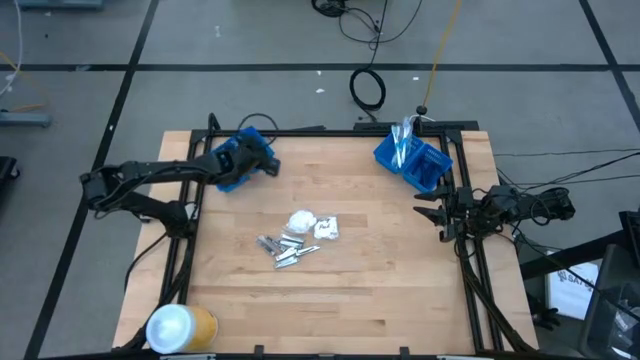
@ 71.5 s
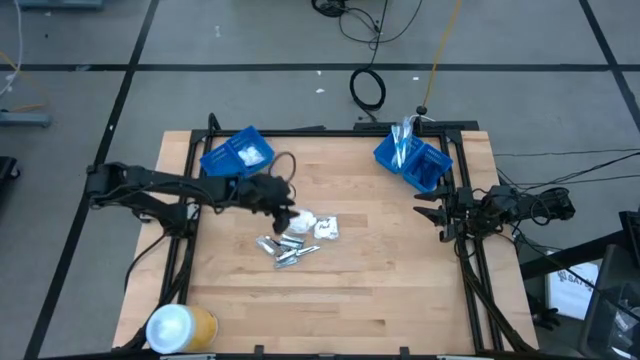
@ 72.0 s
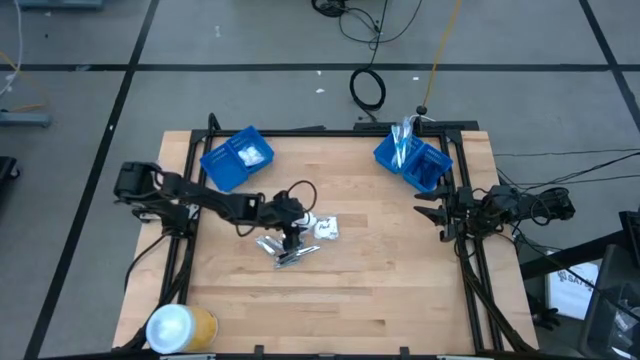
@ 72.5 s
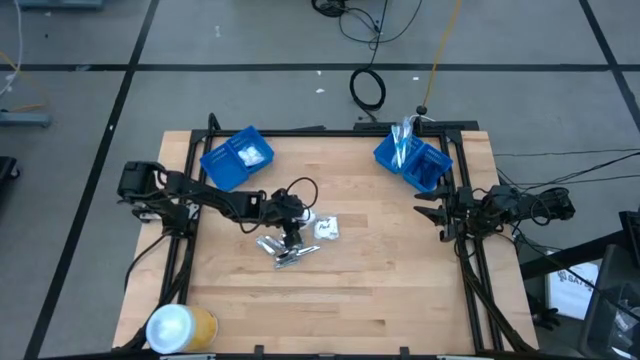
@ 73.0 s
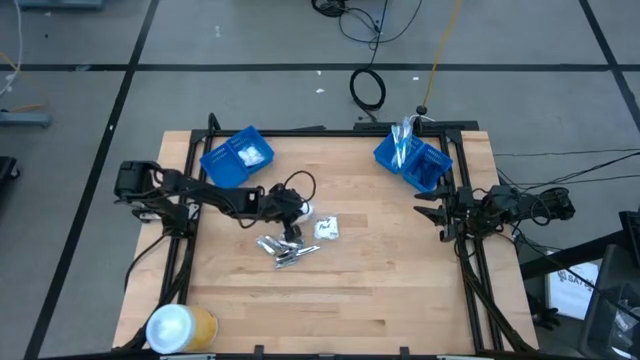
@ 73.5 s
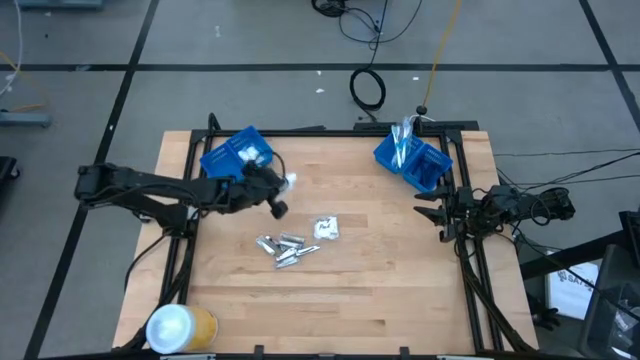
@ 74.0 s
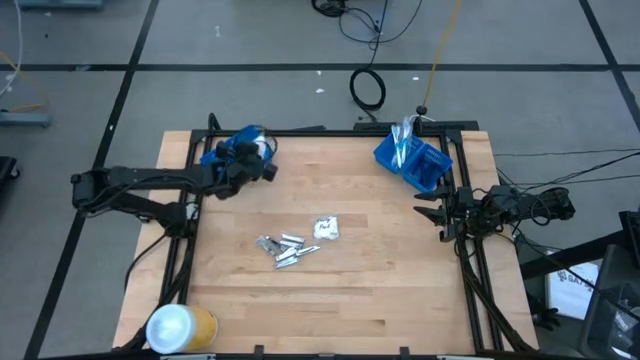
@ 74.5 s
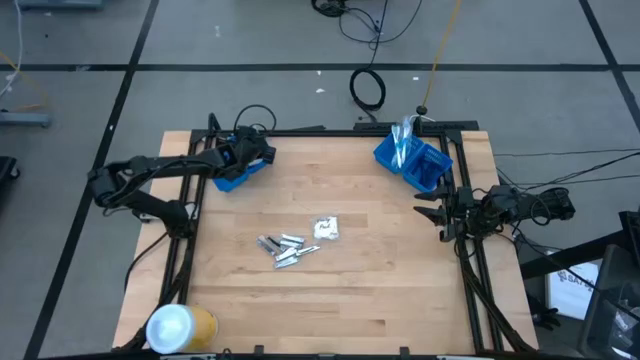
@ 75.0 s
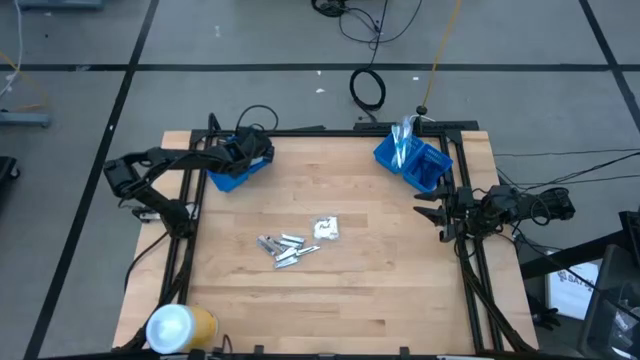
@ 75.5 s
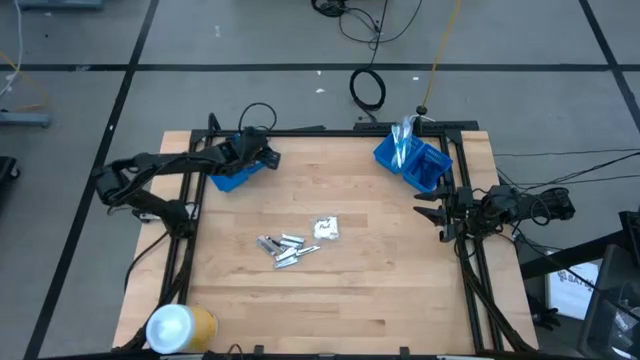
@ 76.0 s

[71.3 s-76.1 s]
Task: Pick & Place Travel size toiletries
Put the transparent cotton pack into the middle left blue basket

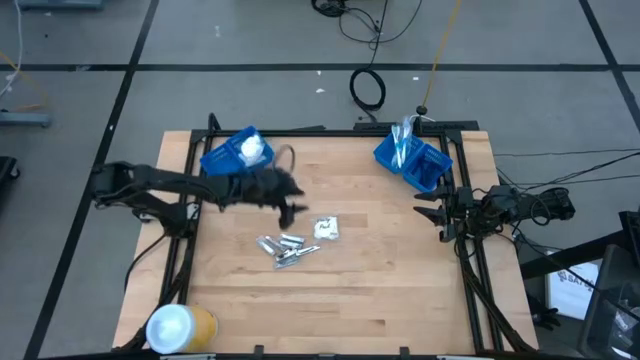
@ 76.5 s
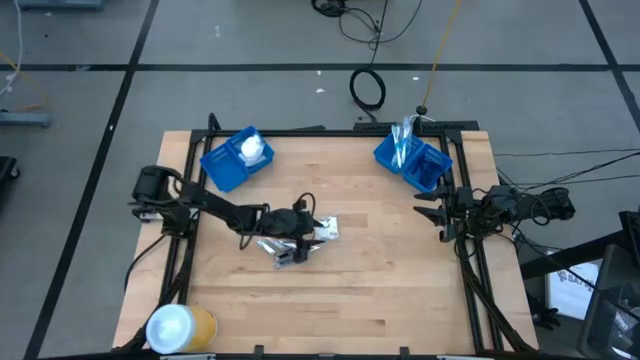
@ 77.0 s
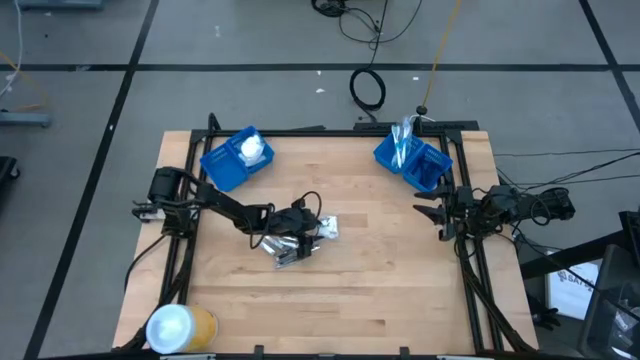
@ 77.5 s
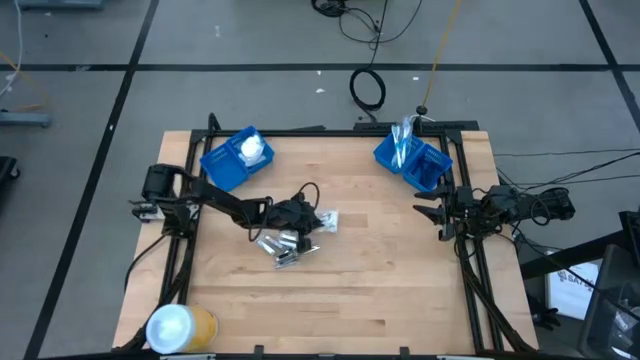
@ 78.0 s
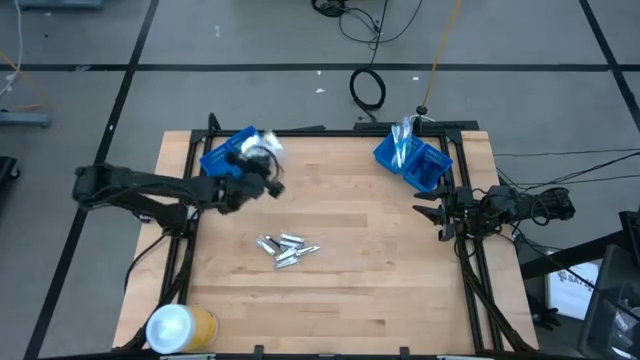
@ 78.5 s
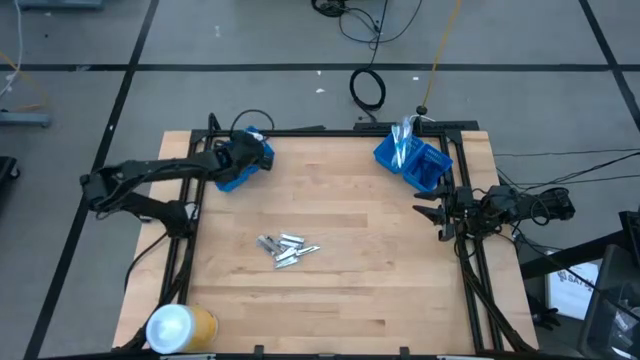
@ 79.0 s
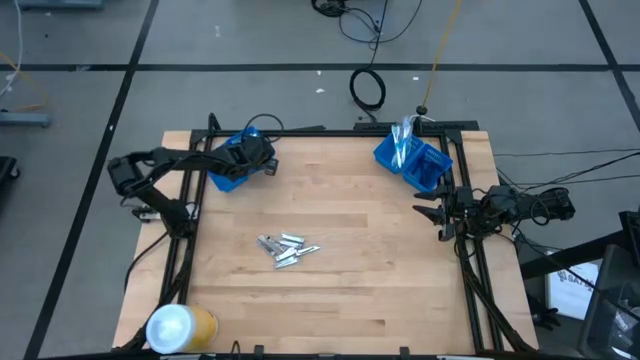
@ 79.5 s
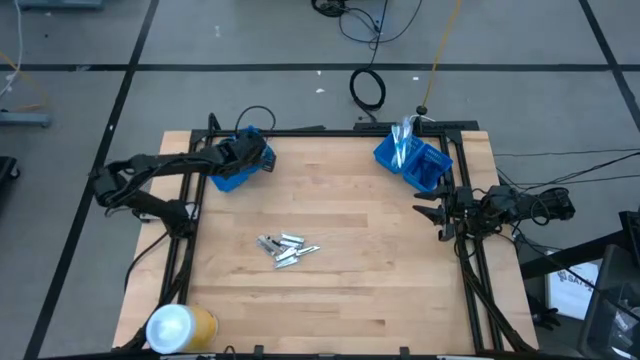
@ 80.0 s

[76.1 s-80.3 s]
Put the transparent cotton pack into the middle left blue basket

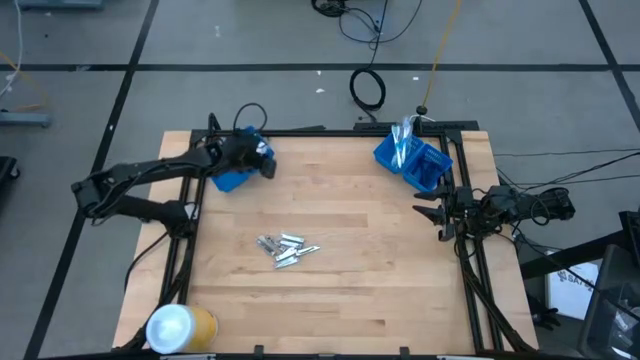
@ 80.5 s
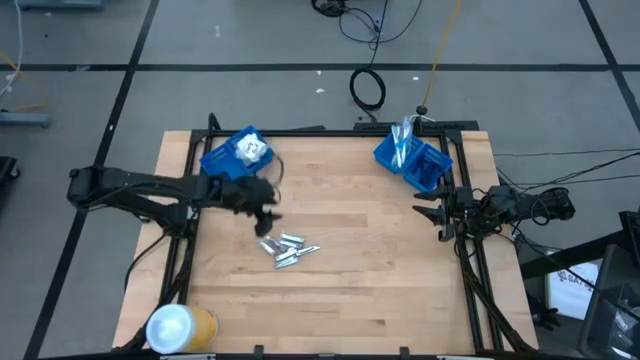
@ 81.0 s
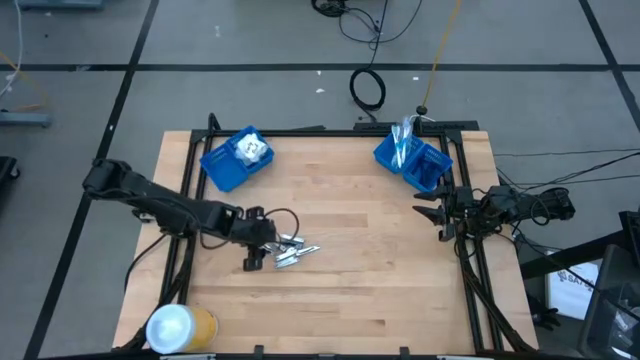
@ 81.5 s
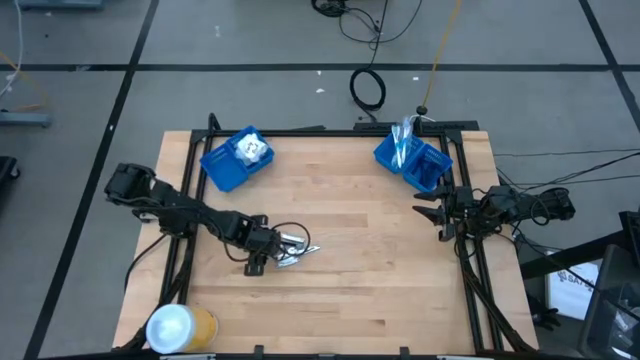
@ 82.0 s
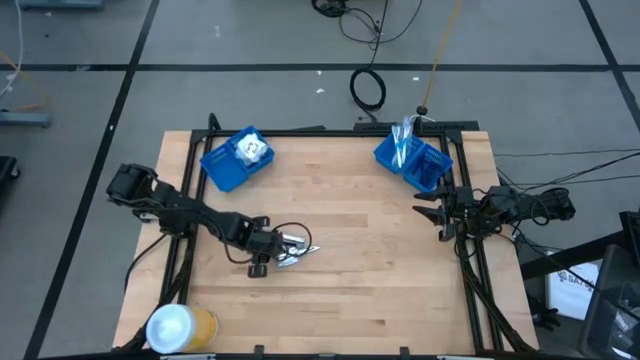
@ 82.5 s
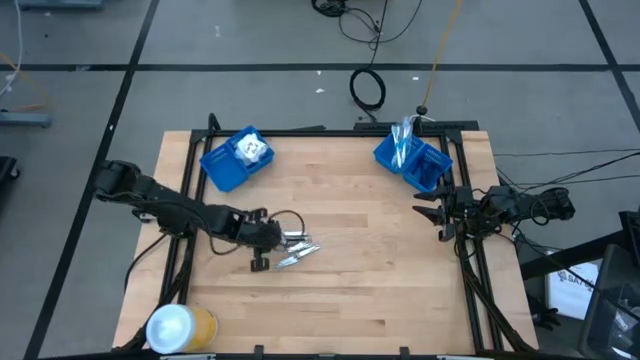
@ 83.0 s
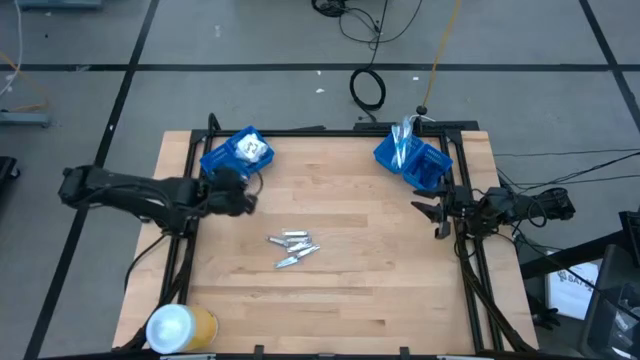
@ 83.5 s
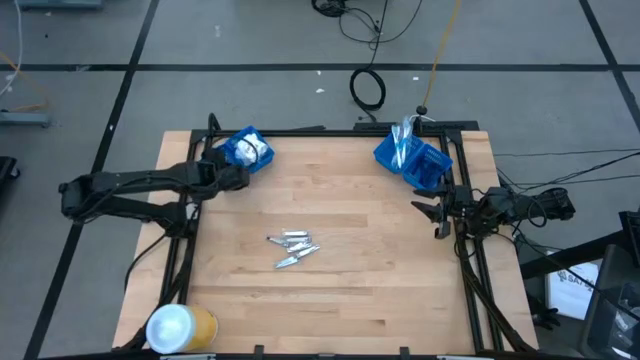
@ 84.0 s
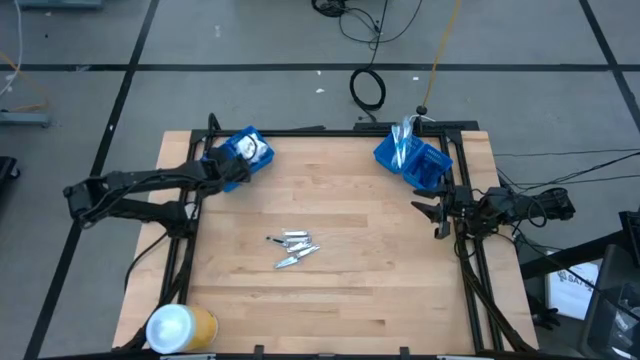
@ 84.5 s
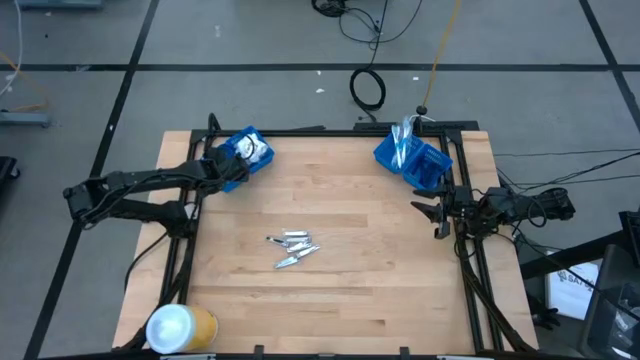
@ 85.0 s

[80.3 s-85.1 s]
Put the silver nail cutter into the left blue basket

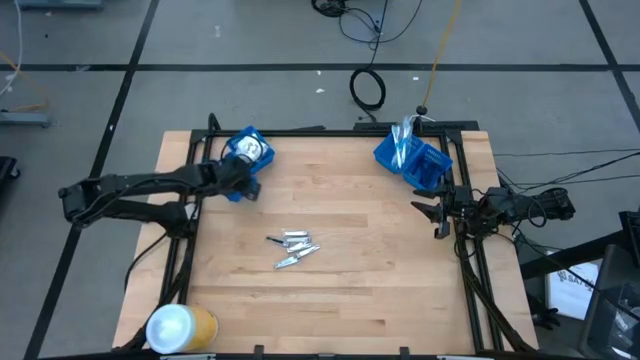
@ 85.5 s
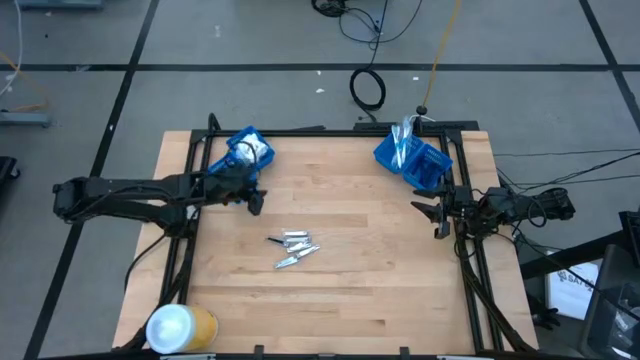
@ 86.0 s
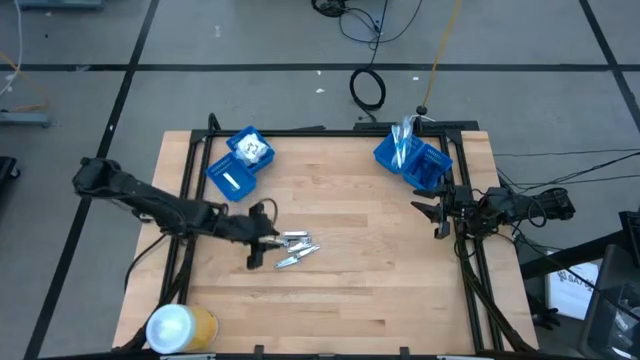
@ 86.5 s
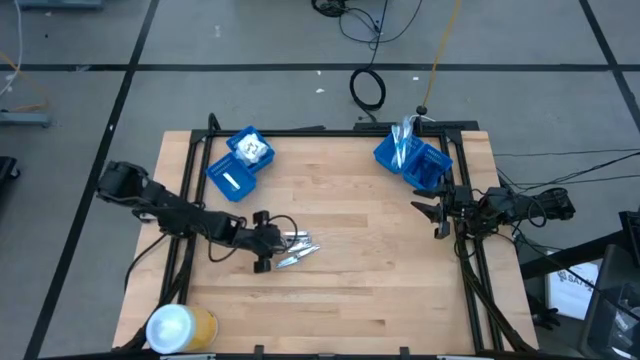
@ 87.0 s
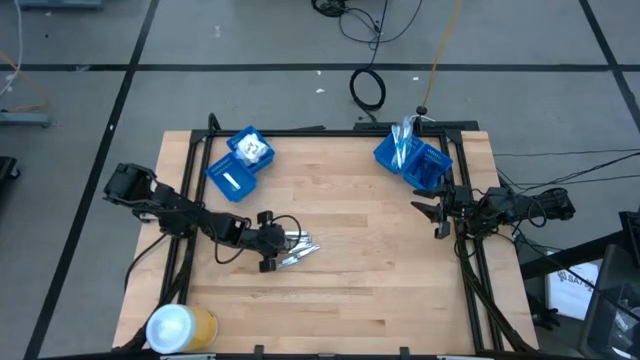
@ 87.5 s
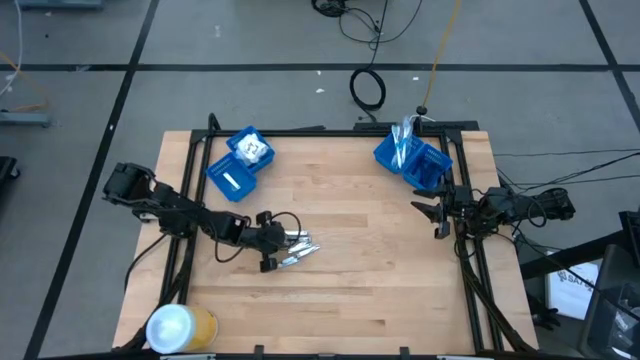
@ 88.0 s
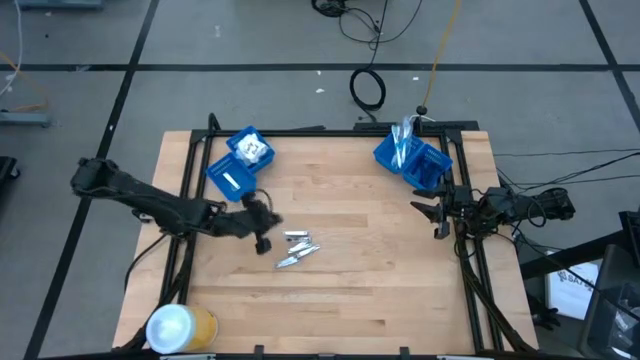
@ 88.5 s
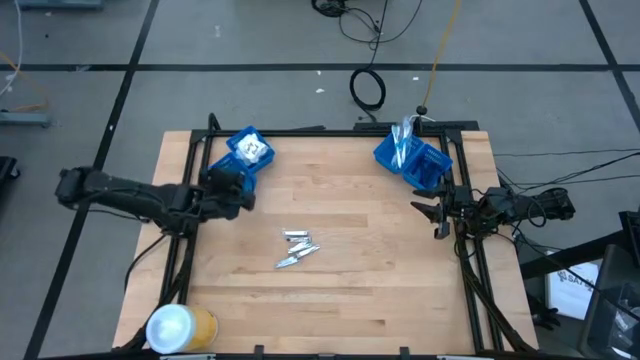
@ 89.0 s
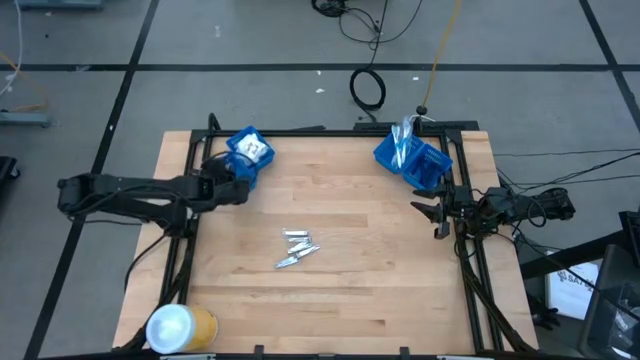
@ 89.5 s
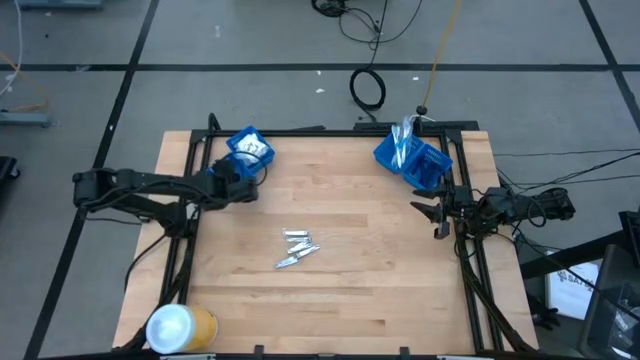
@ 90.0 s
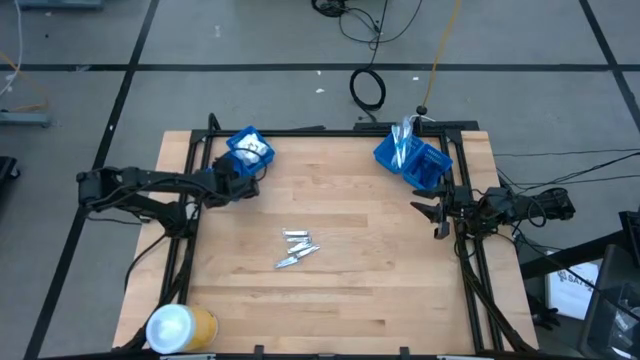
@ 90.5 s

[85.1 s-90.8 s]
Put the silver nail cutter into the left blue basket

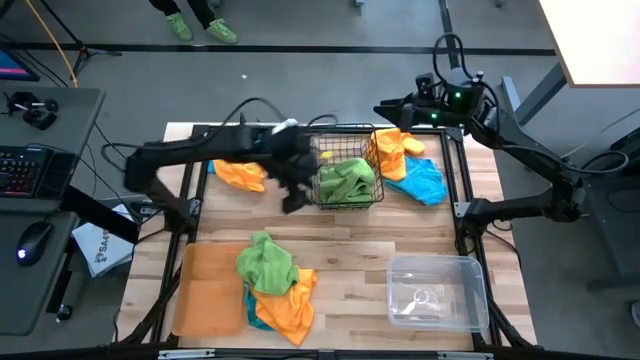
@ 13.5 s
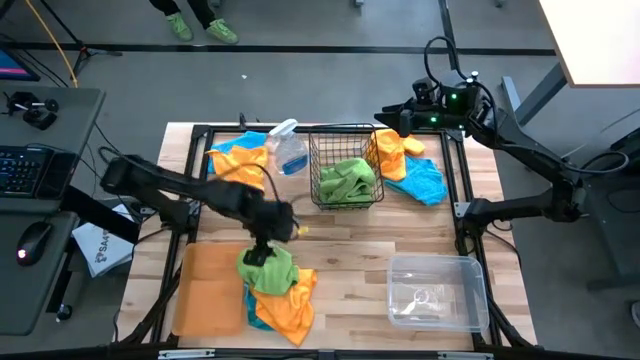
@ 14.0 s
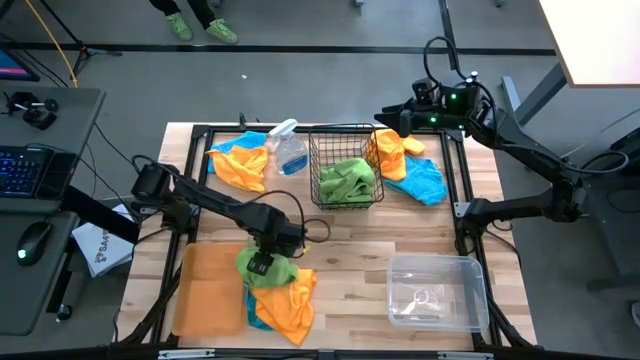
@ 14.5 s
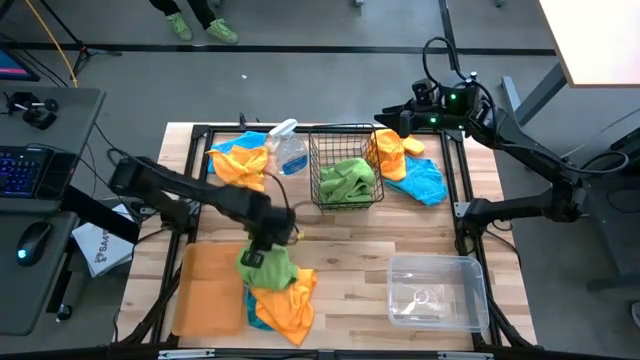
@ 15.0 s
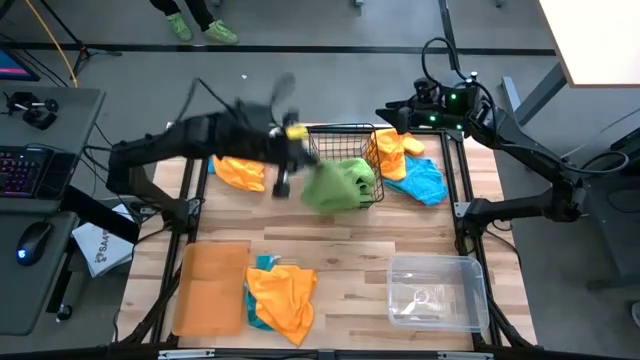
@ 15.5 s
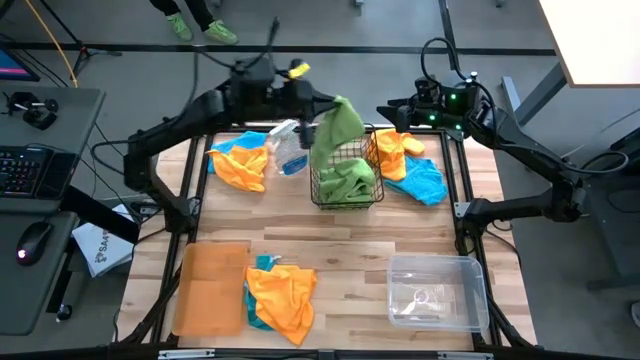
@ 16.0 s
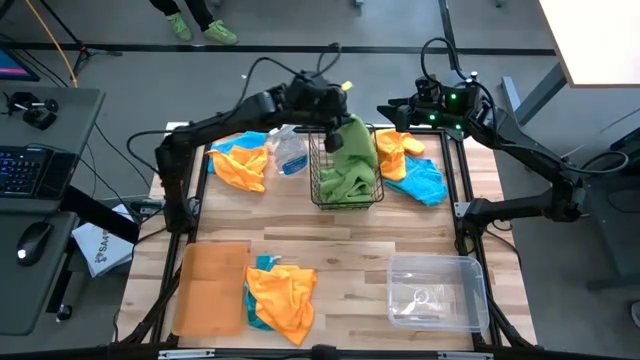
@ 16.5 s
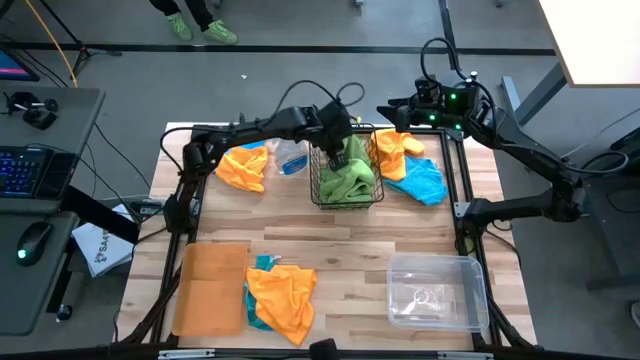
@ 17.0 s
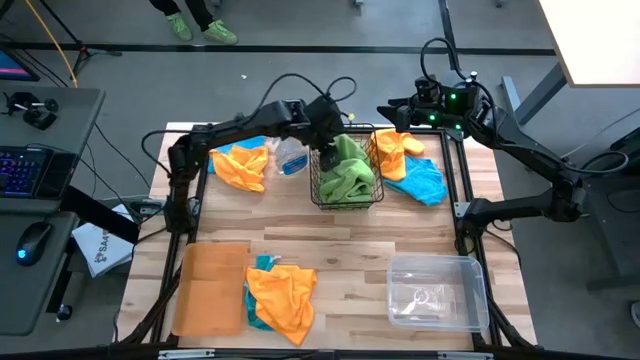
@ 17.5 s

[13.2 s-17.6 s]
Task: Sort microfiber towel by color & place in baskets
Put the green towel into the black wire basket
